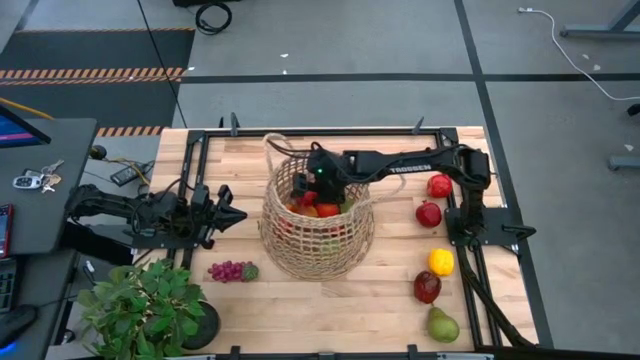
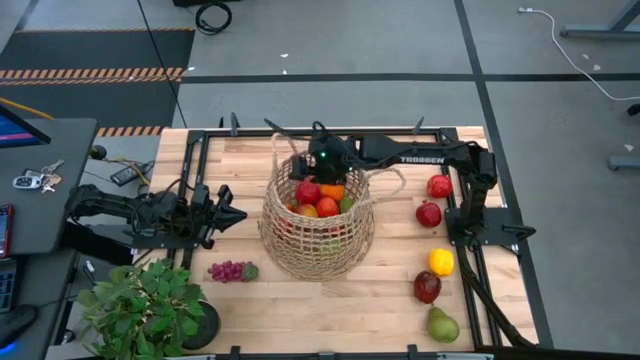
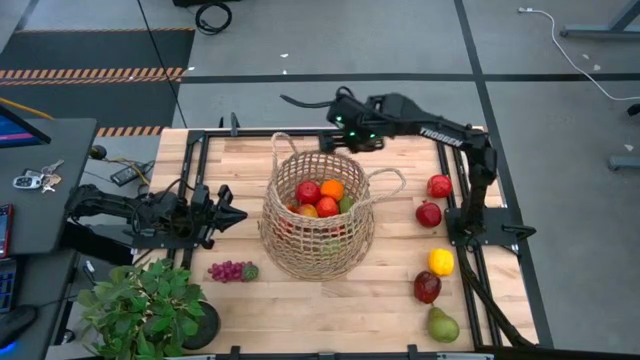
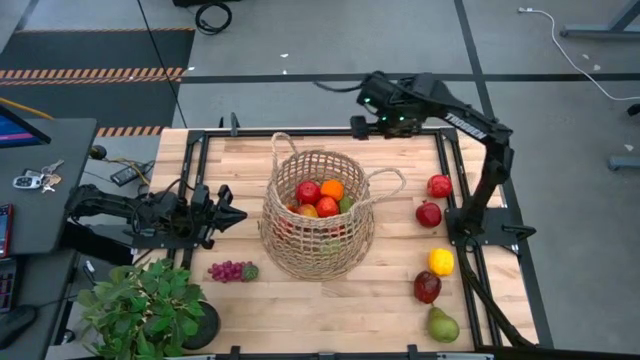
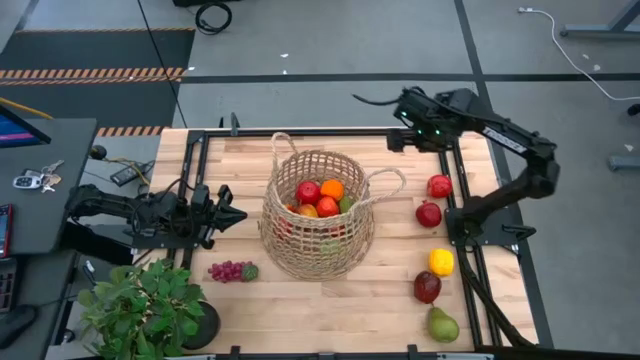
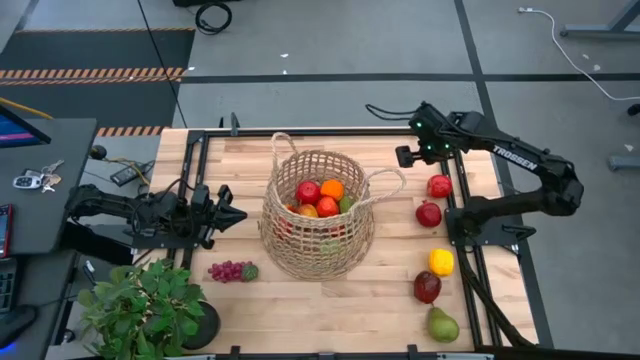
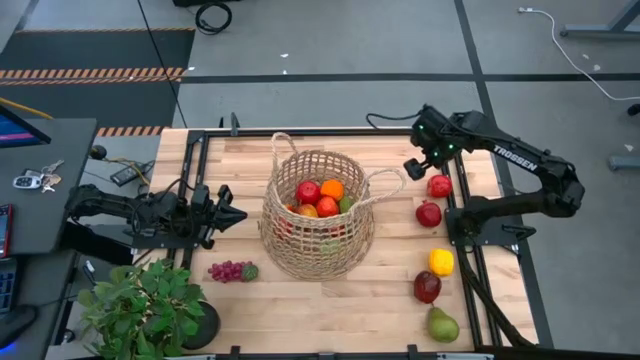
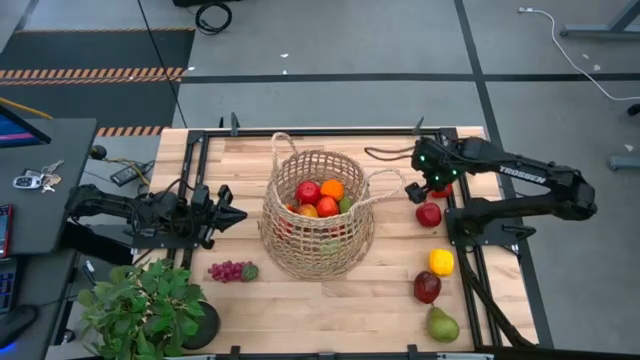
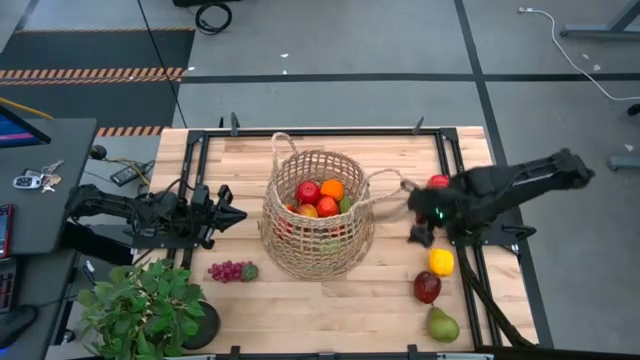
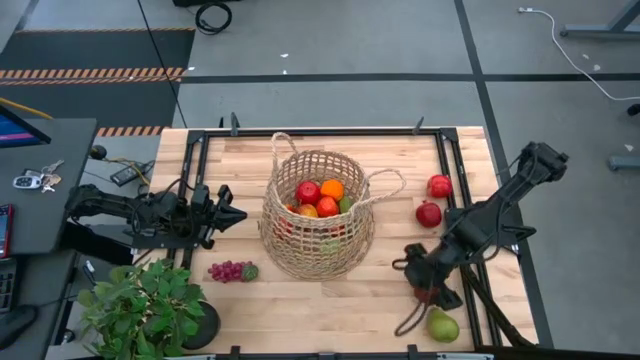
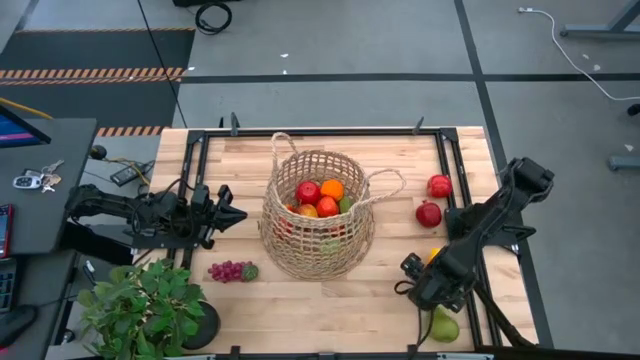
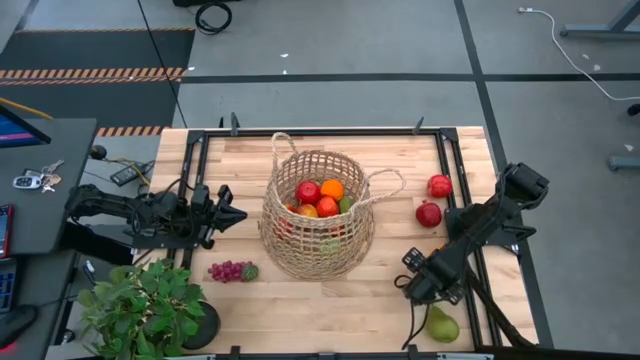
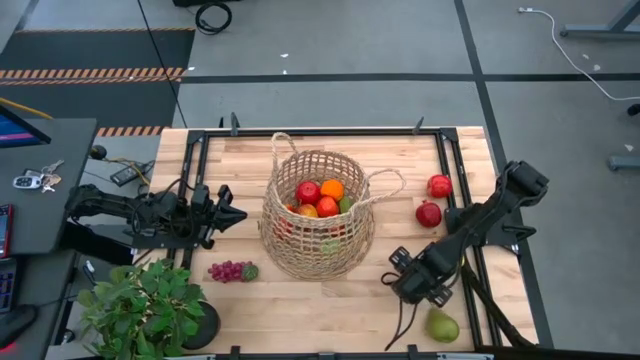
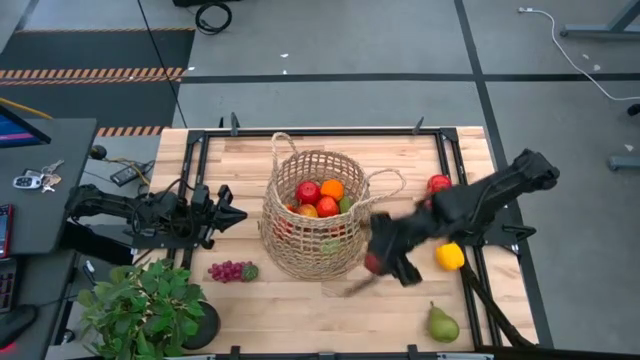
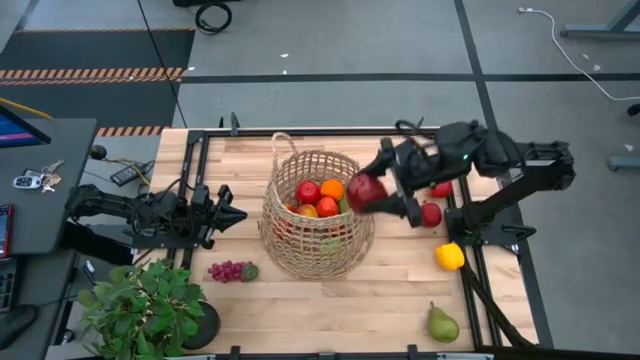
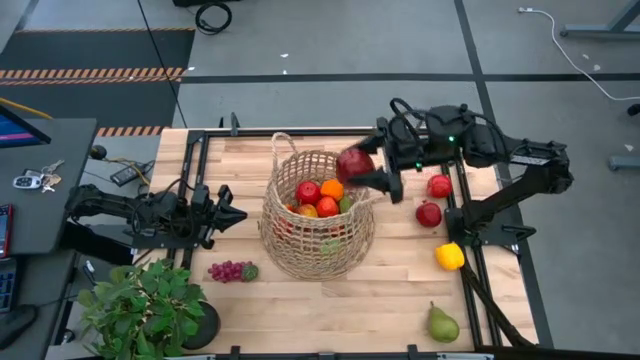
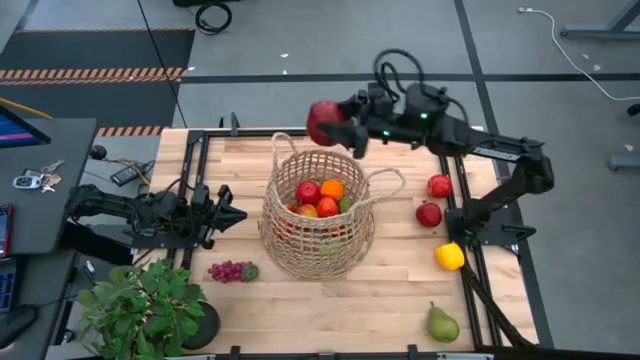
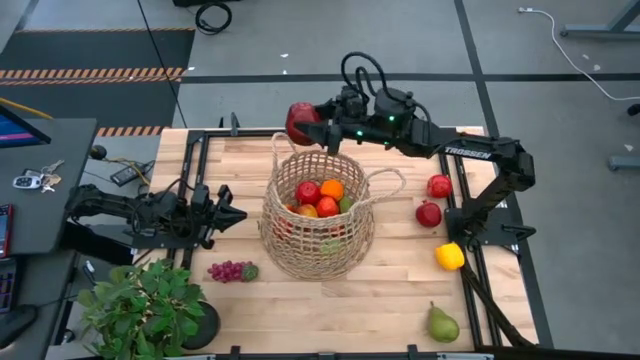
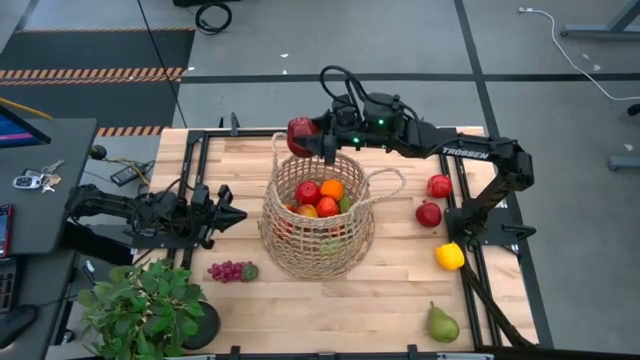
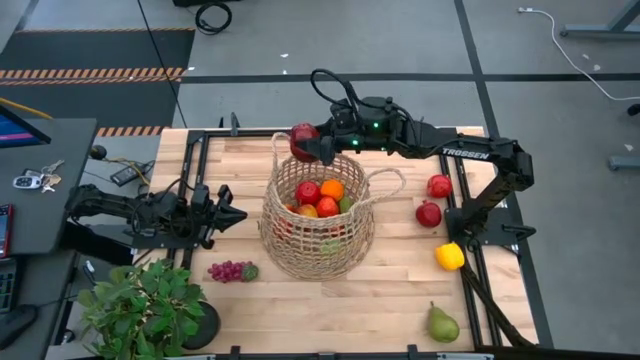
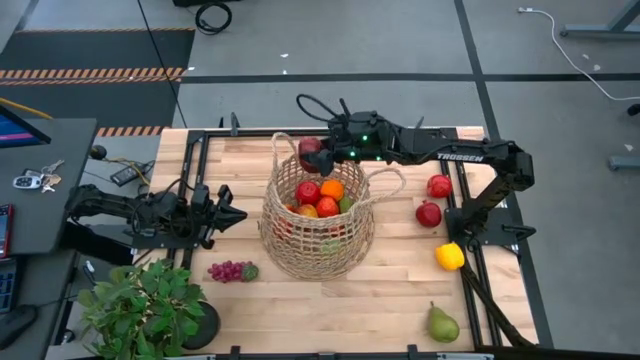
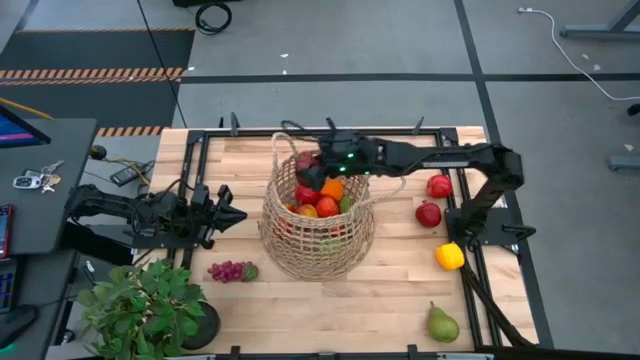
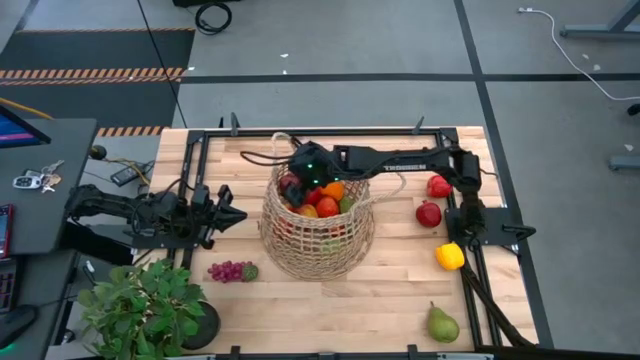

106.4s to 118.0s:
Task: Build produce basket
Put the red apple into the brown basket

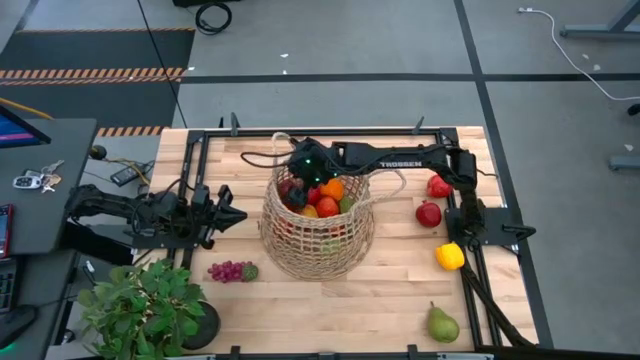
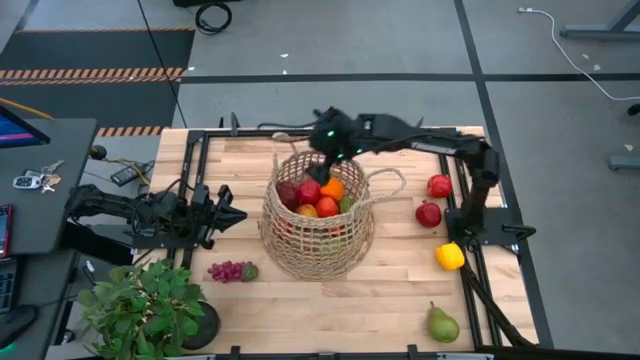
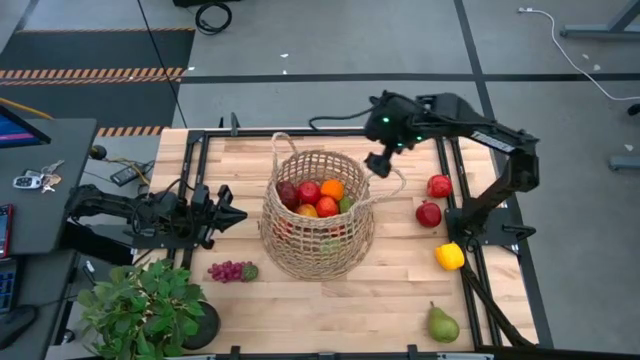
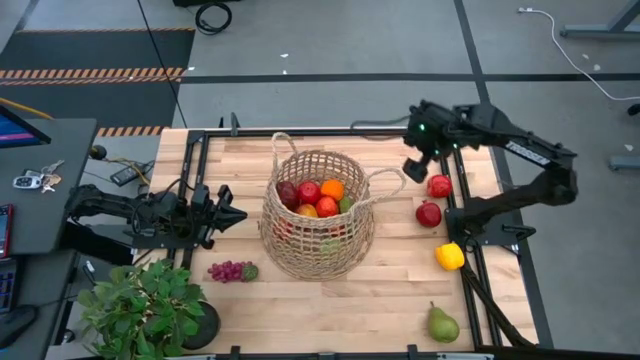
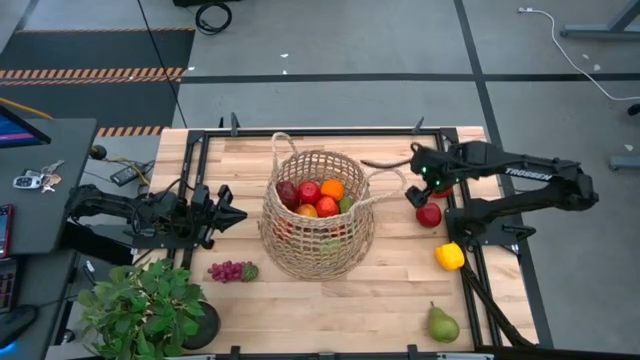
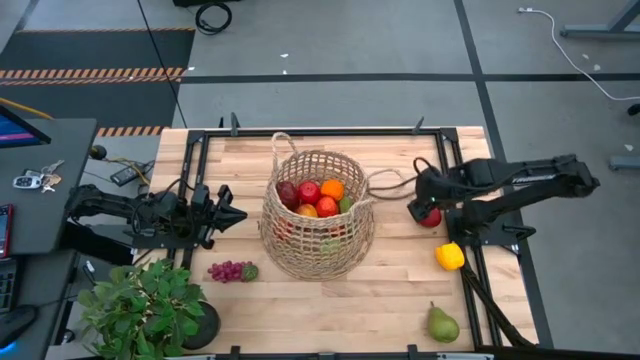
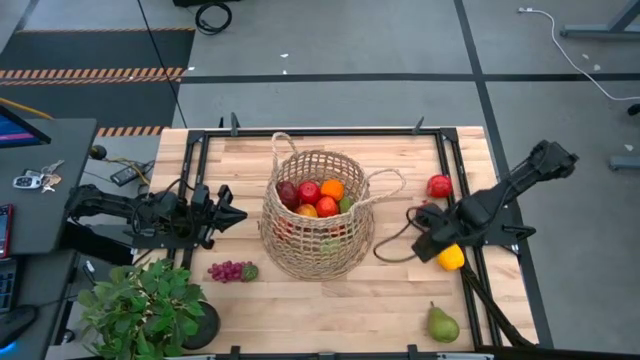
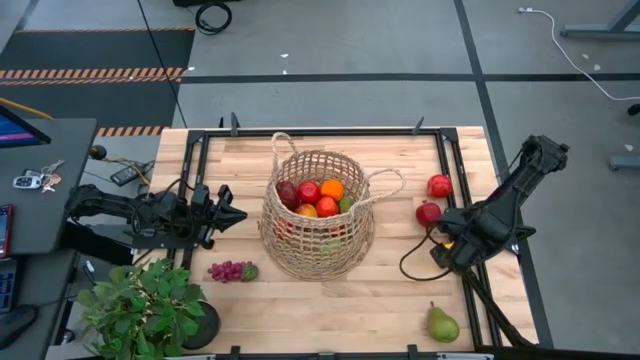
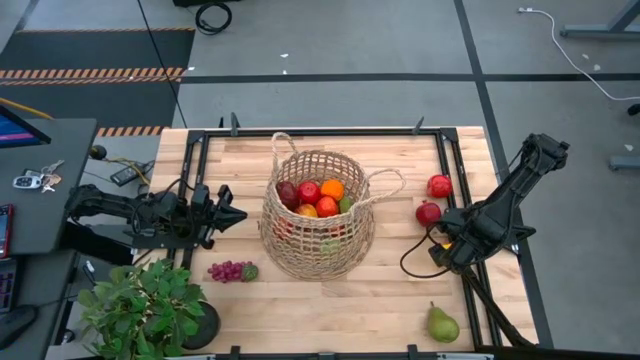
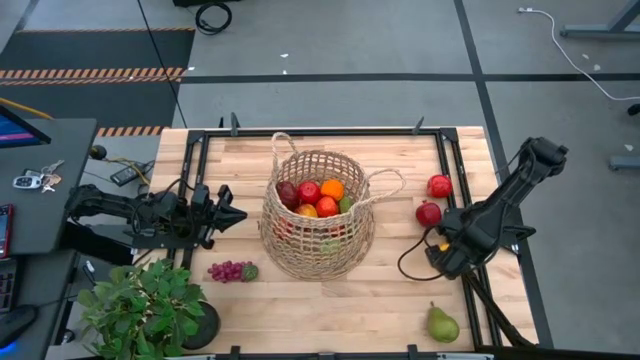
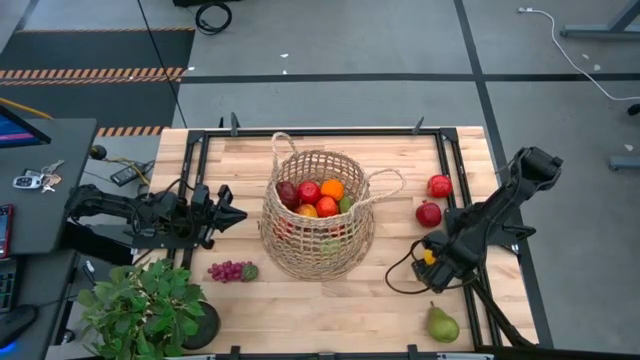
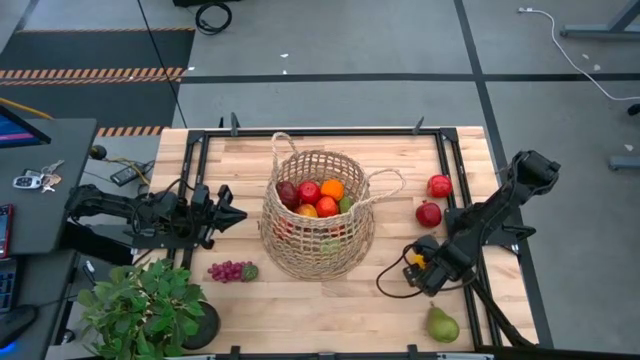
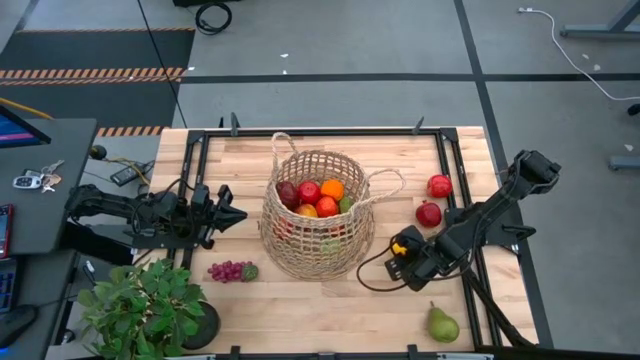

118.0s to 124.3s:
Put the yellow bell pepper into the brown basket

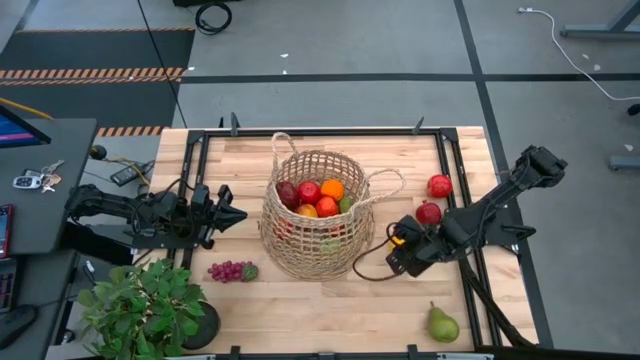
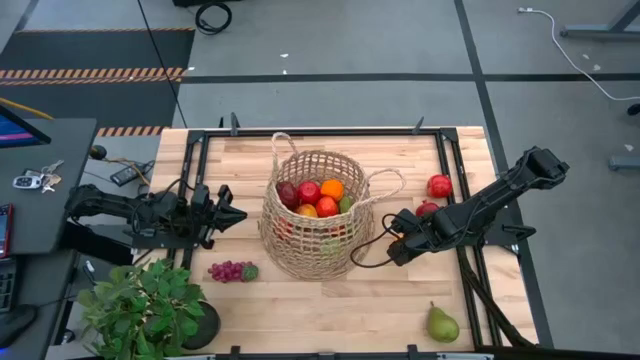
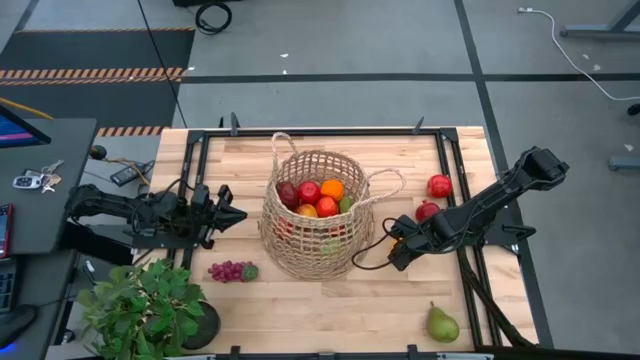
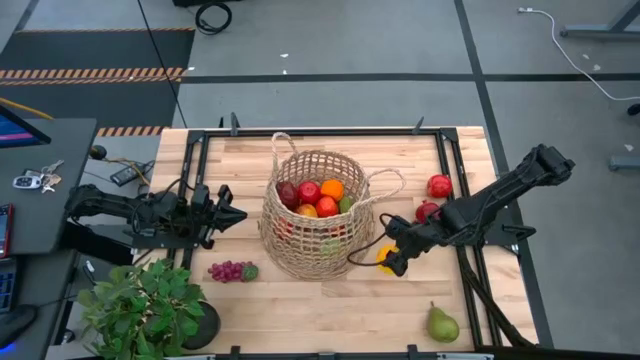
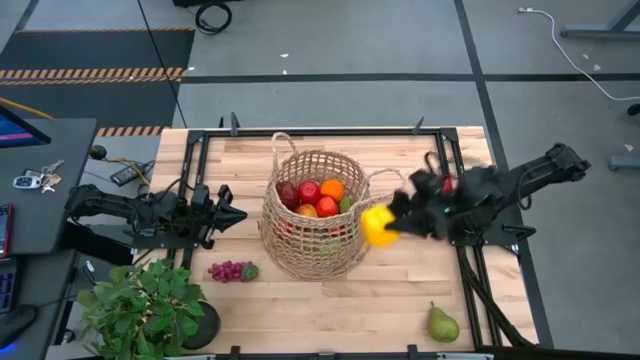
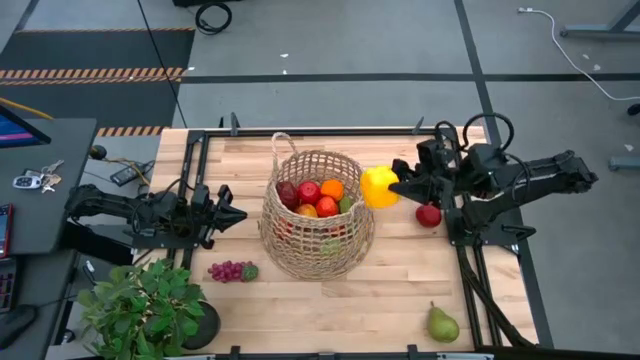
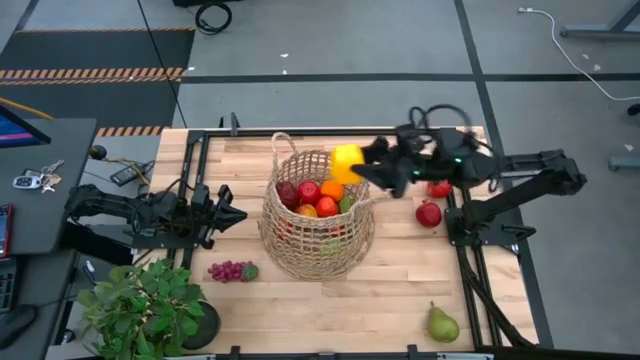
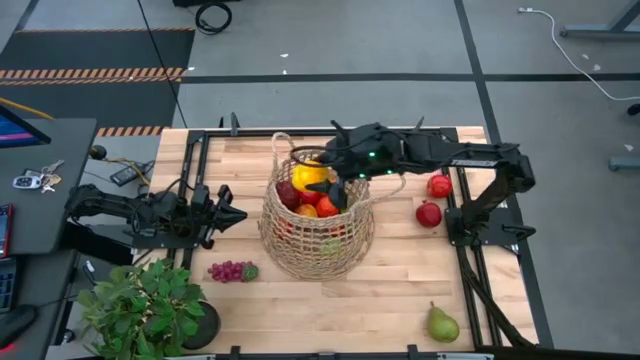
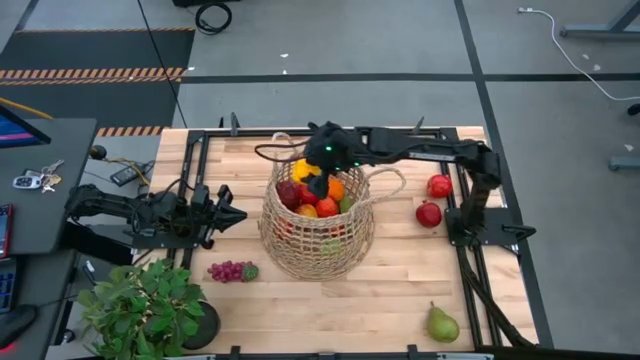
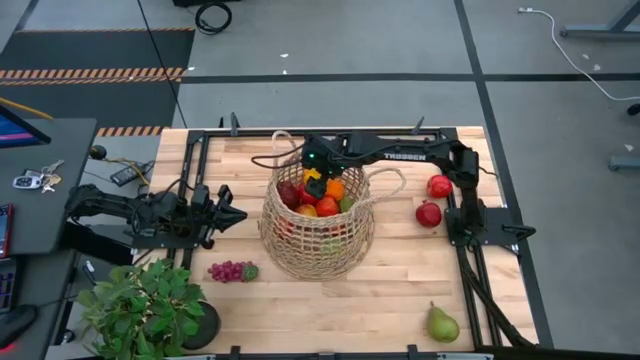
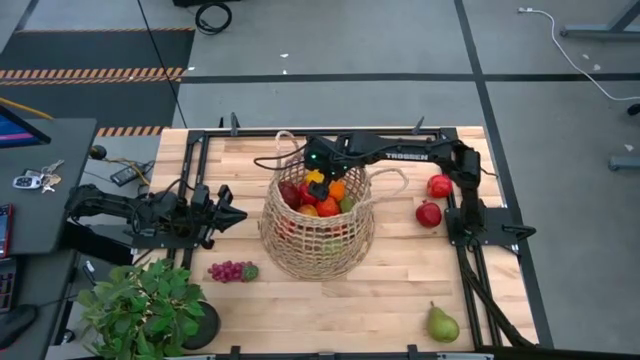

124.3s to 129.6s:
Put the yellow bell pepper into the brown basket
